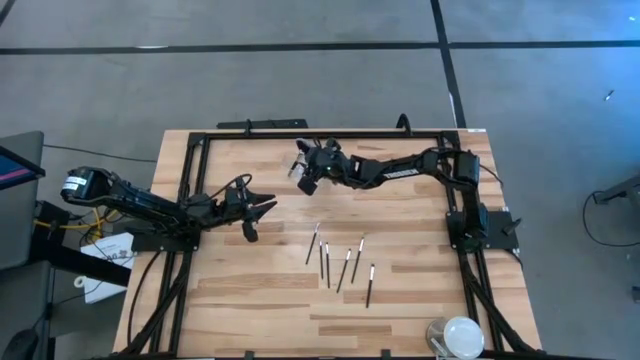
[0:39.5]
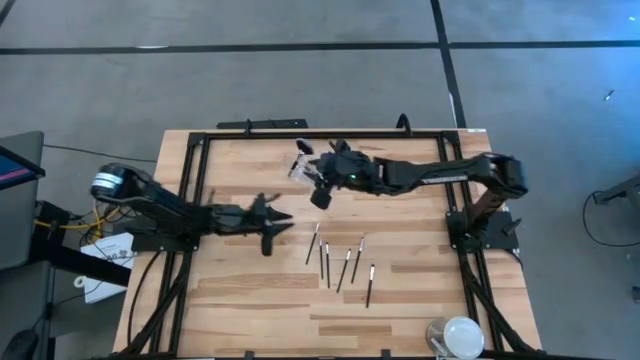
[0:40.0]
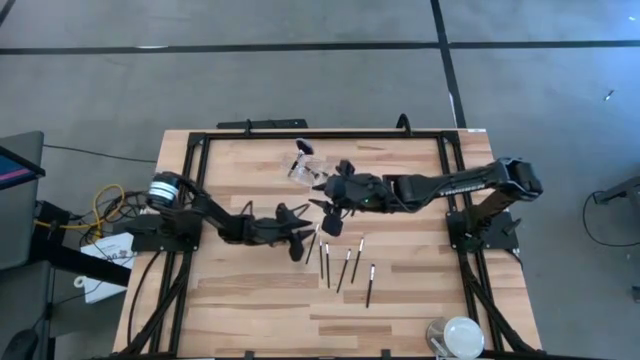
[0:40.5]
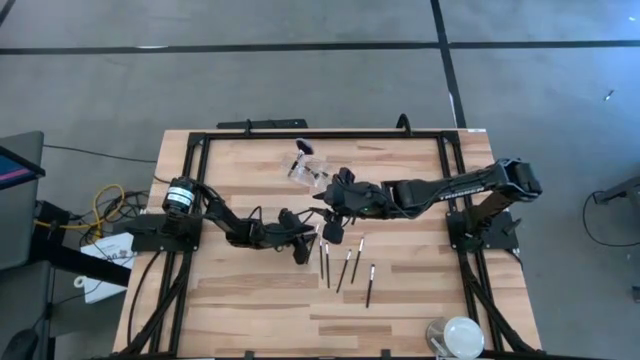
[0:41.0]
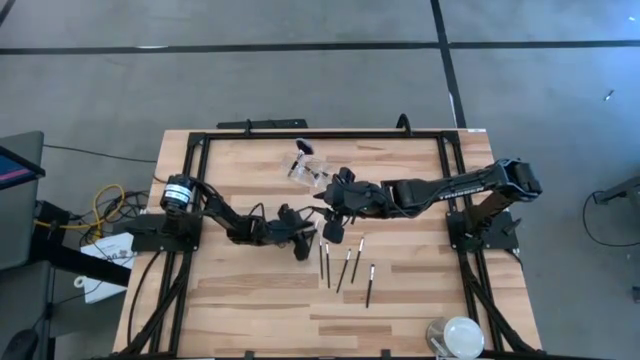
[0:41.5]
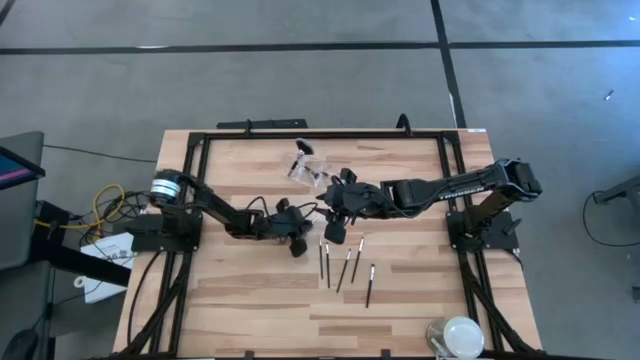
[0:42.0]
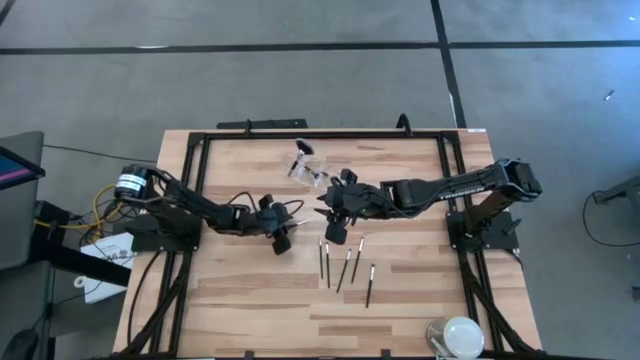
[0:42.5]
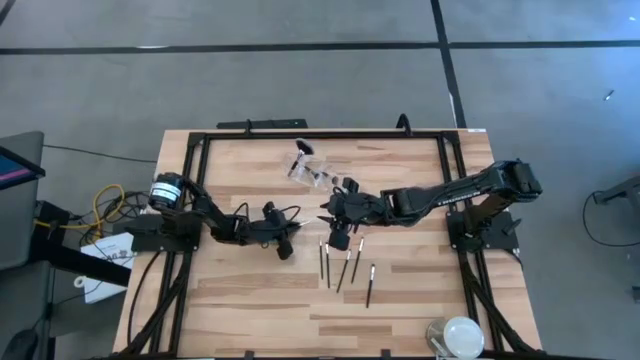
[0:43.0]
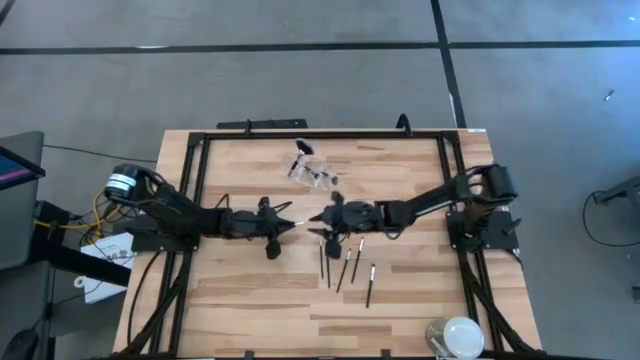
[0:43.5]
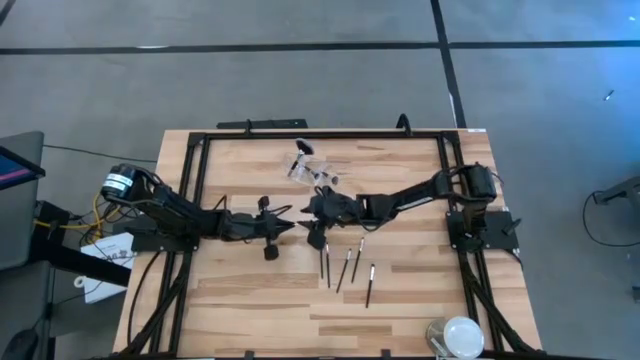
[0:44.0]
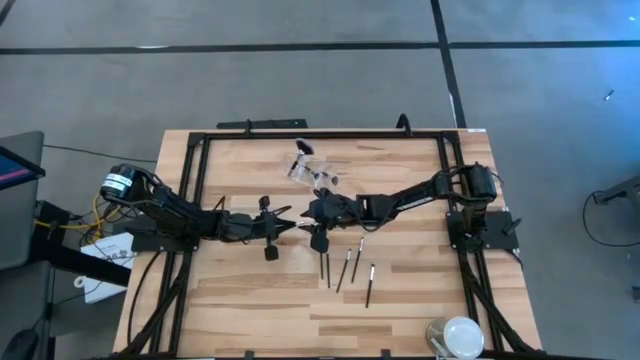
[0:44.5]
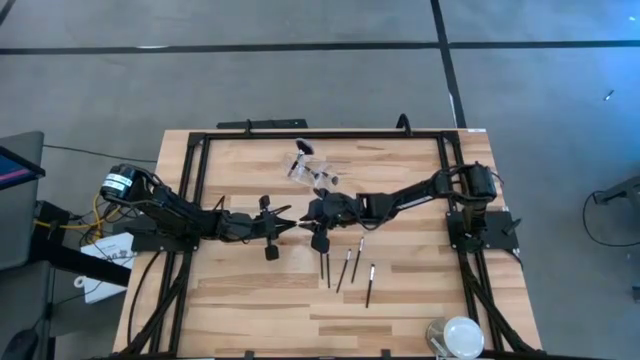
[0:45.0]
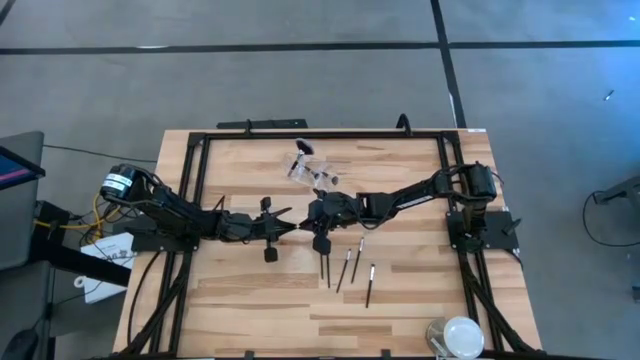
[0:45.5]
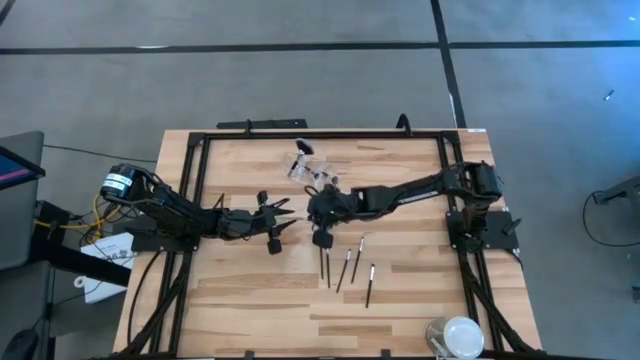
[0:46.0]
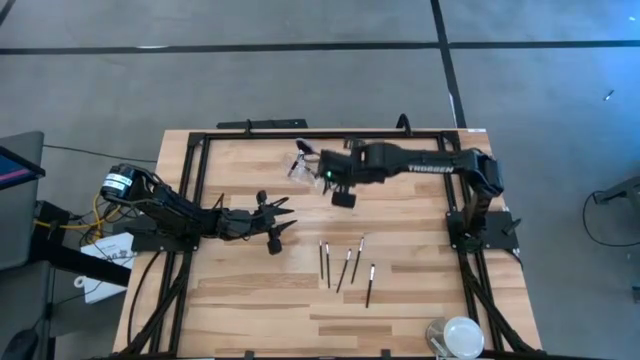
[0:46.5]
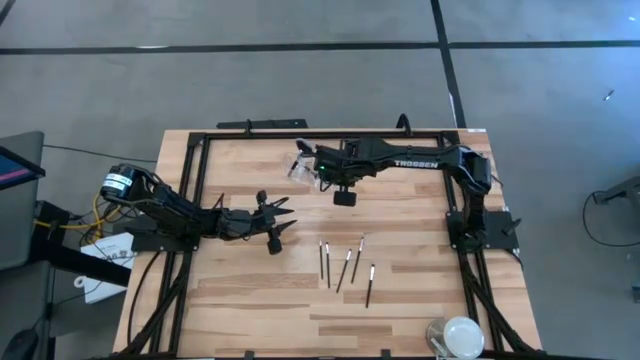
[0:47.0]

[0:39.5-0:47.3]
Task: Sort items
Put the left eyeshadow brush into the transparent organizer

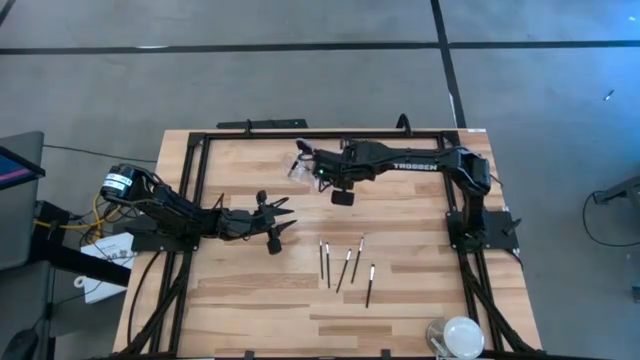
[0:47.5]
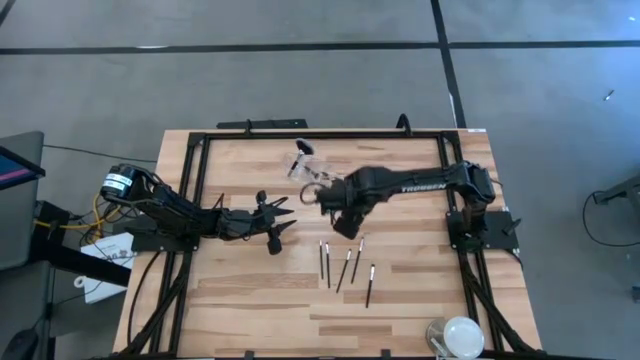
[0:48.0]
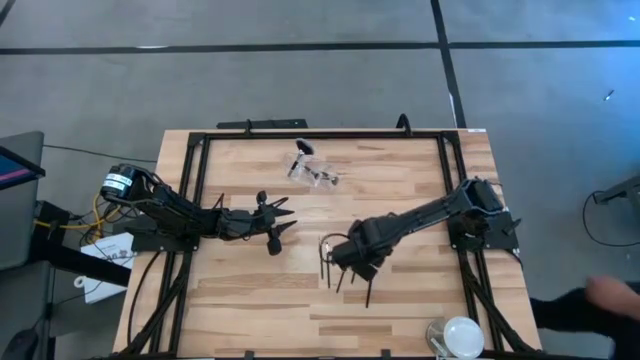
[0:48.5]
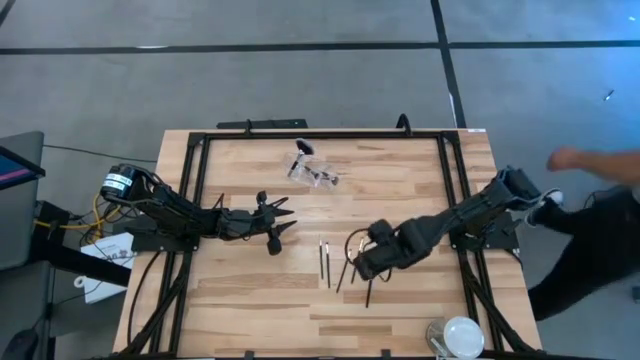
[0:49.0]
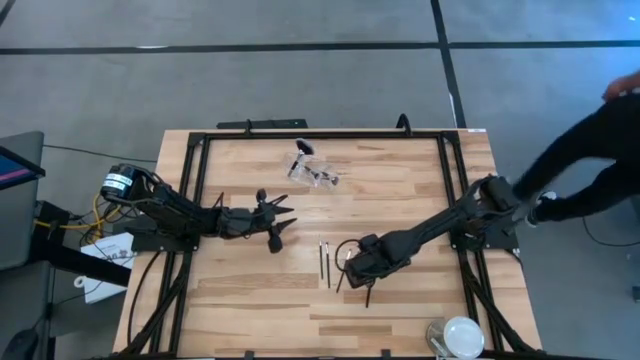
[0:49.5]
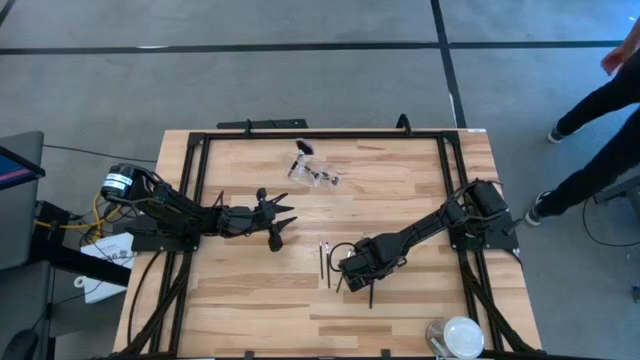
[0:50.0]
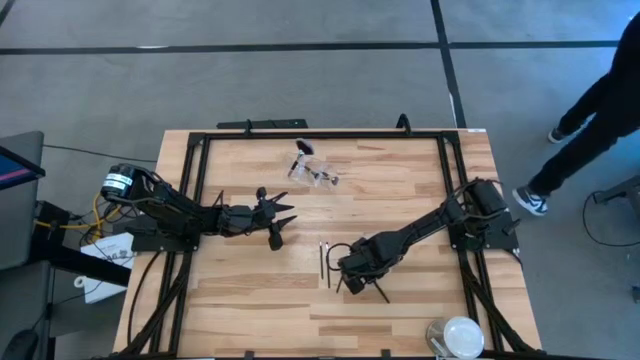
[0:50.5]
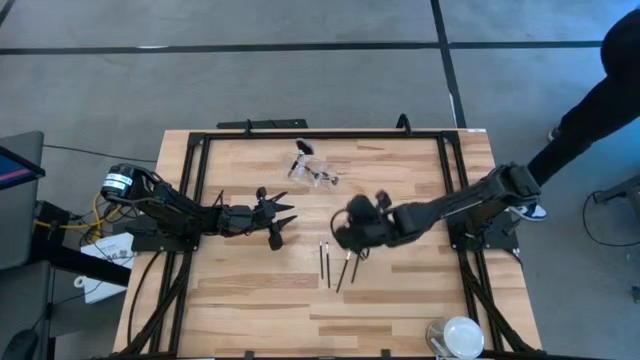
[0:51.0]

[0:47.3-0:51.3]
Put the right foundation brush into the transparent organizer

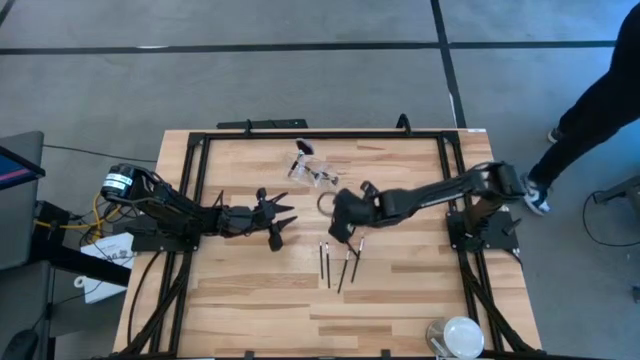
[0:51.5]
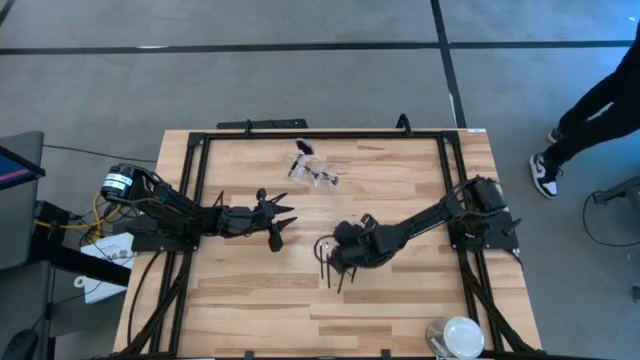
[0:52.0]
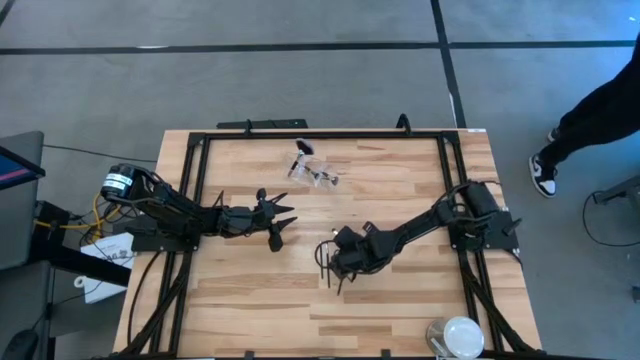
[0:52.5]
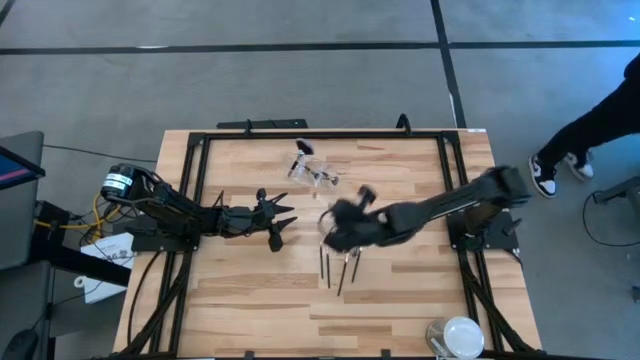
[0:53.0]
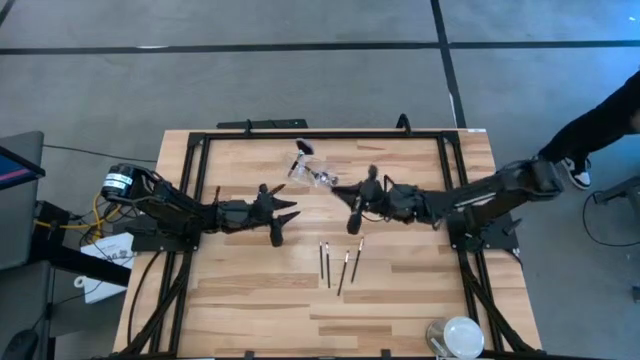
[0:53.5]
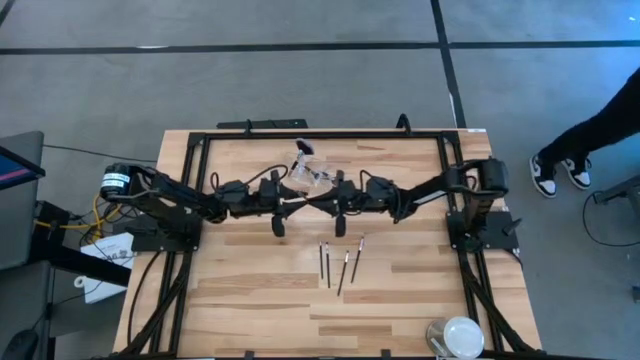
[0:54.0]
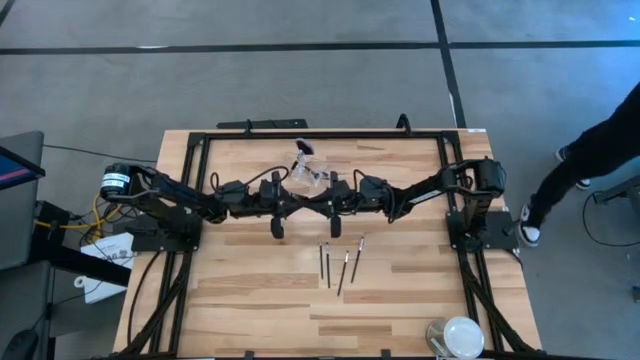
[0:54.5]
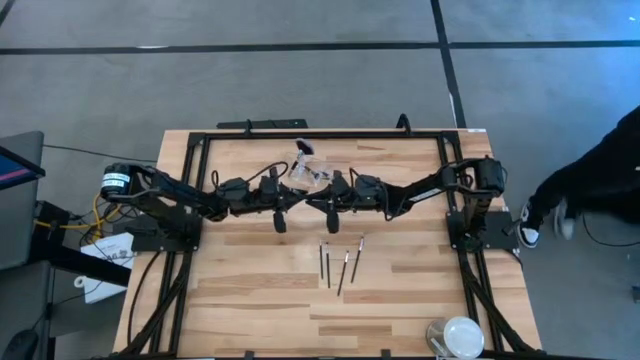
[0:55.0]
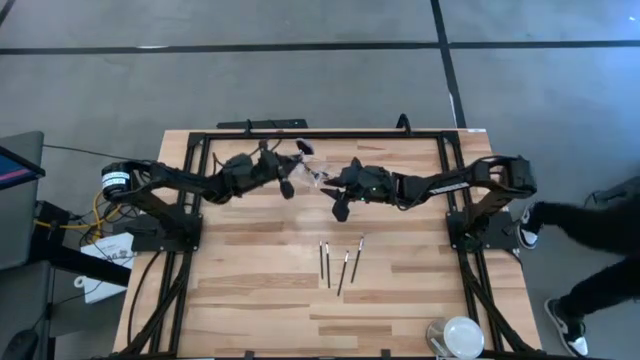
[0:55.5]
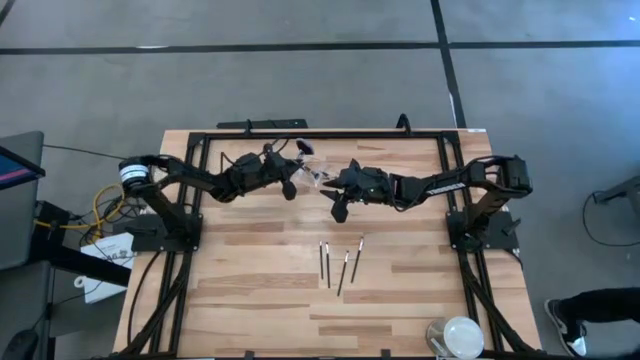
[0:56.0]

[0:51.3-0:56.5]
Put the left foundation brush brush into the transparent organizer

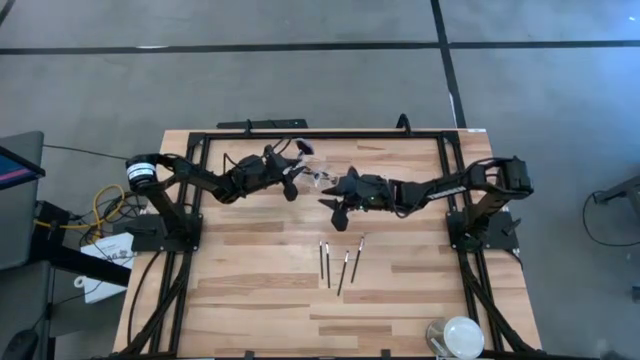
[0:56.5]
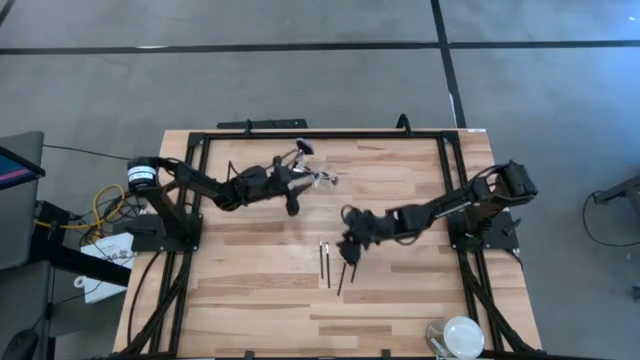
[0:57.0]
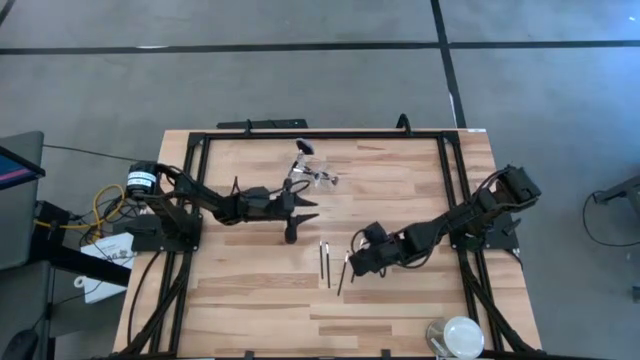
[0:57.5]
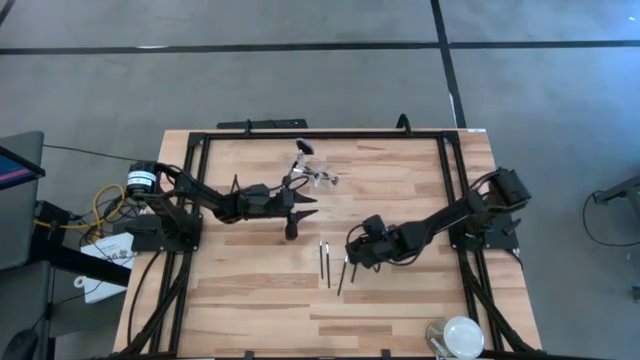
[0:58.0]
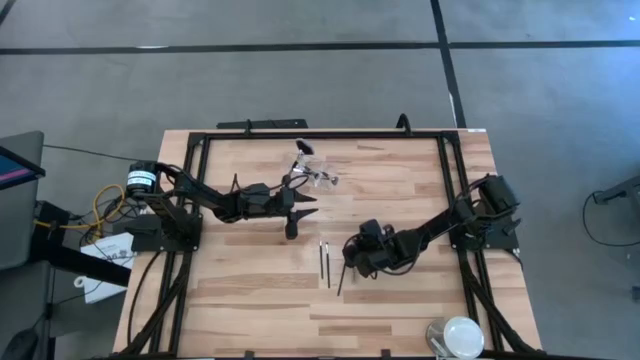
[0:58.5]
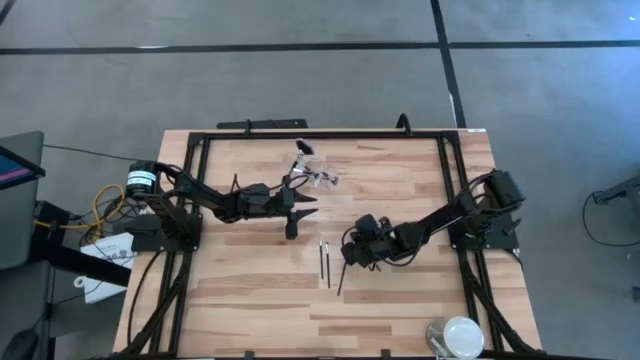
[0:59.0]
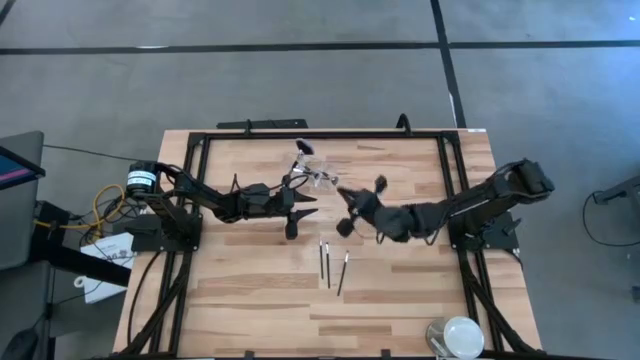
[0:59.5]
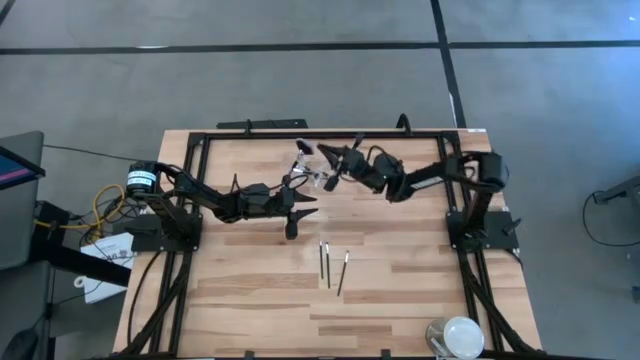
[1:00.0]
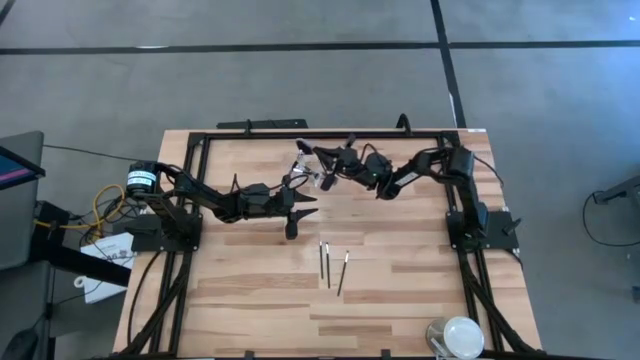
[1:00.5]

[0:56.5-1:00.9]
Put the foundation brush into the transparent organizer
